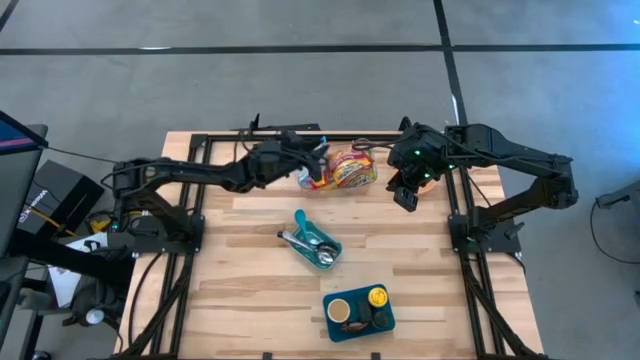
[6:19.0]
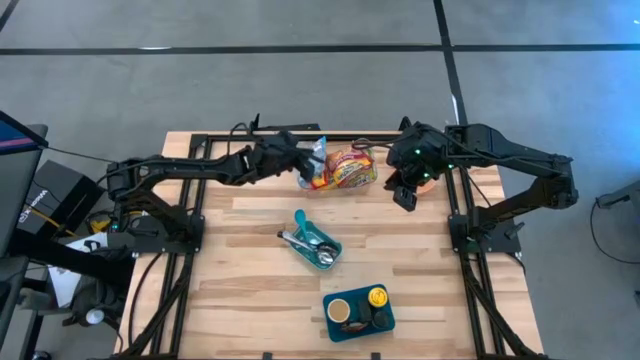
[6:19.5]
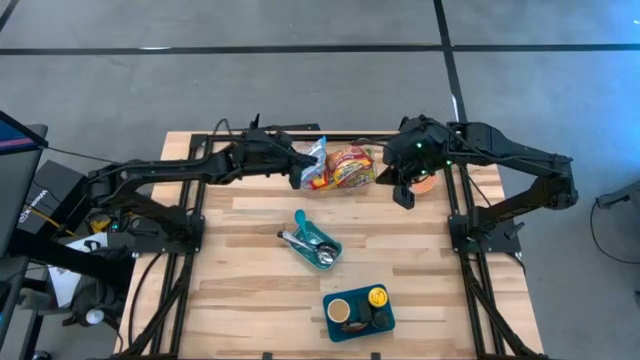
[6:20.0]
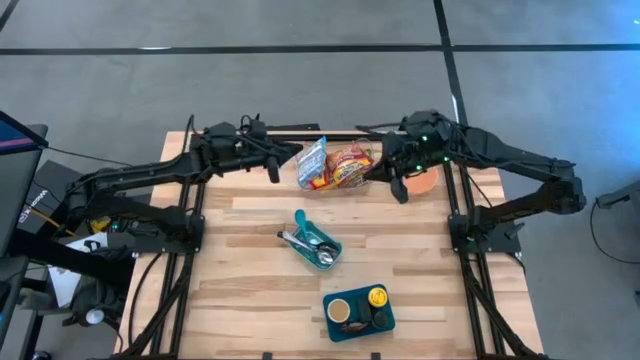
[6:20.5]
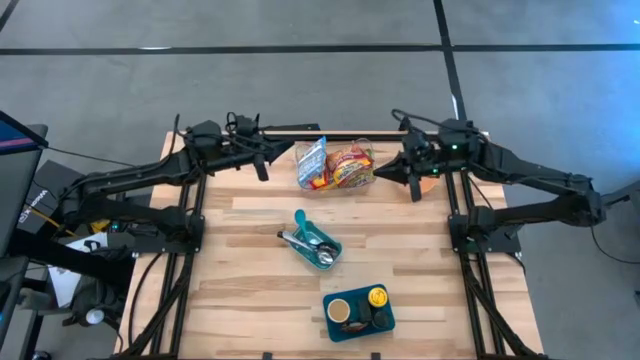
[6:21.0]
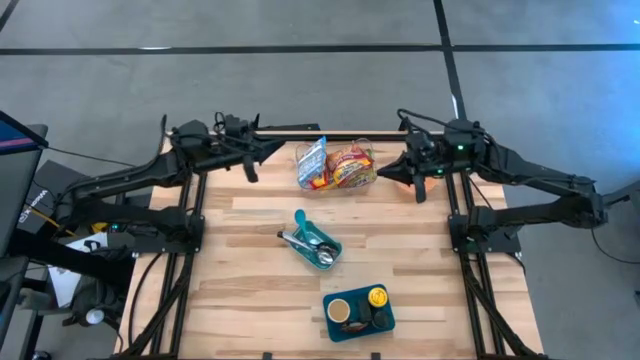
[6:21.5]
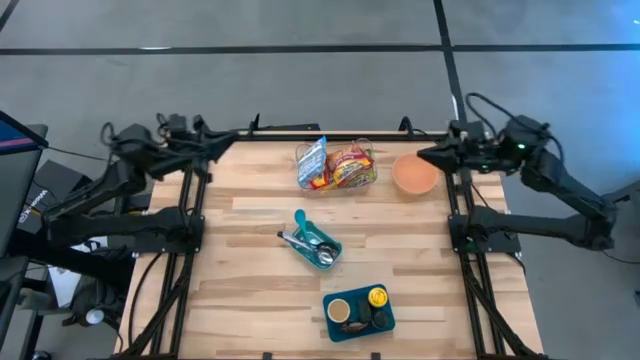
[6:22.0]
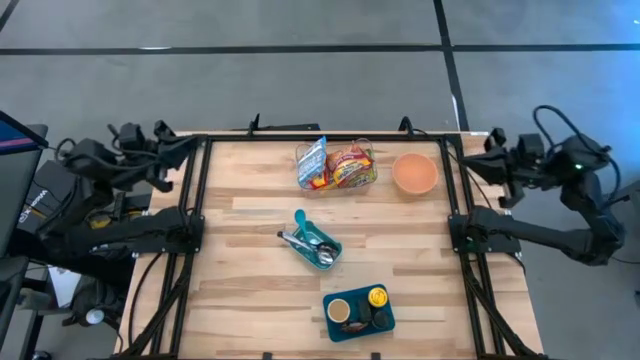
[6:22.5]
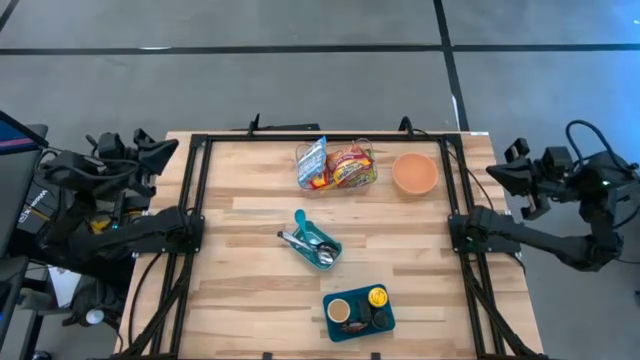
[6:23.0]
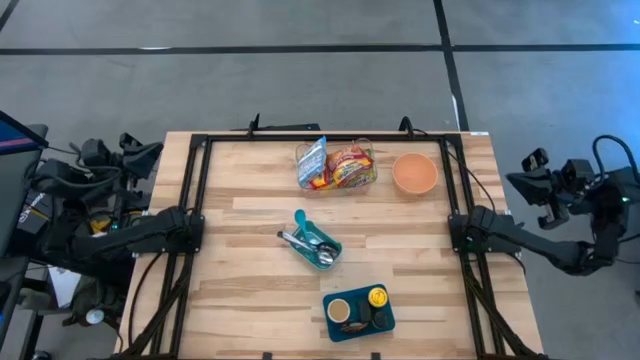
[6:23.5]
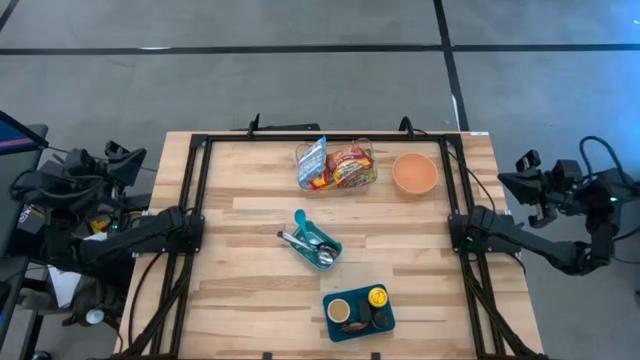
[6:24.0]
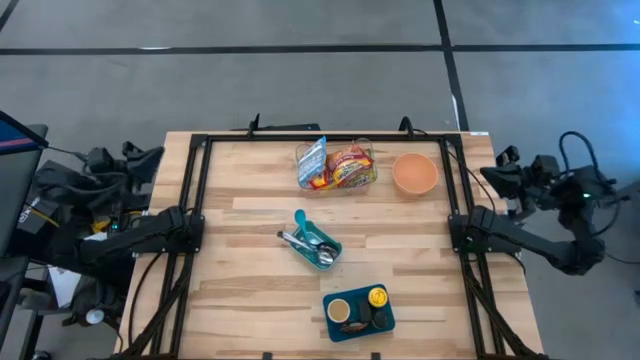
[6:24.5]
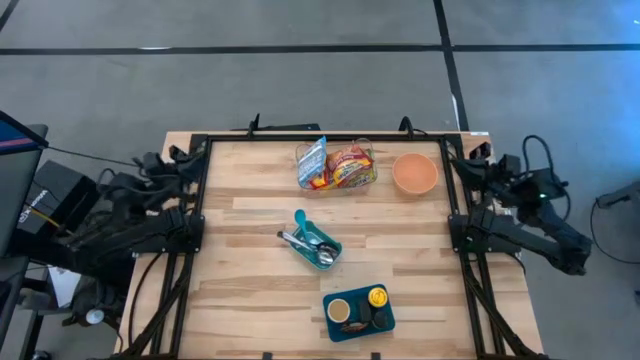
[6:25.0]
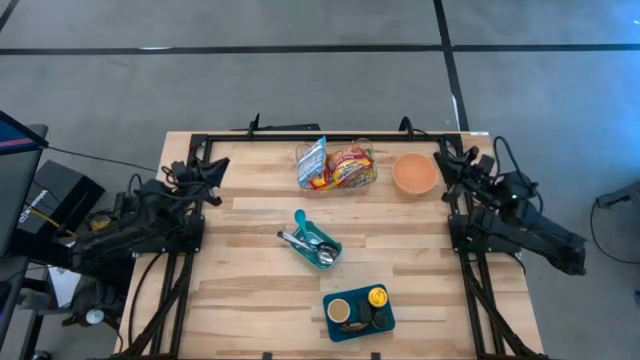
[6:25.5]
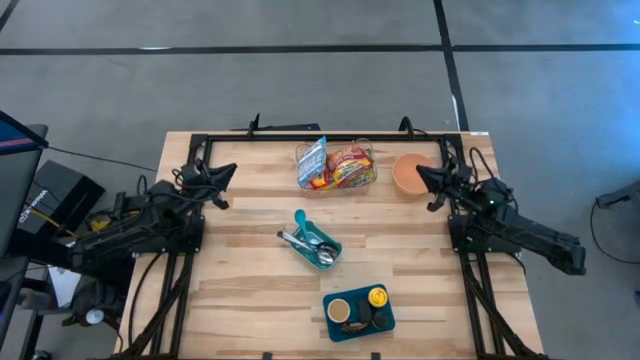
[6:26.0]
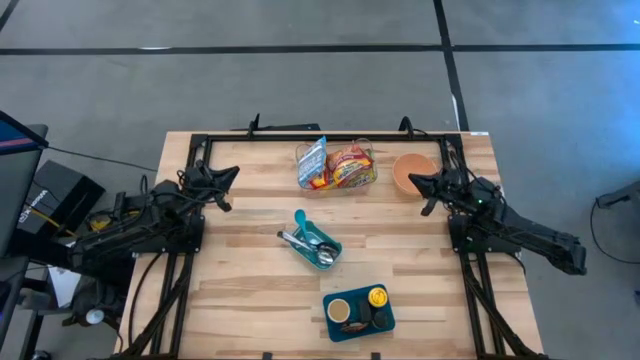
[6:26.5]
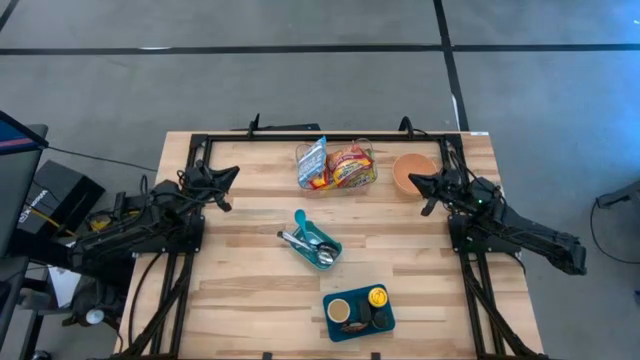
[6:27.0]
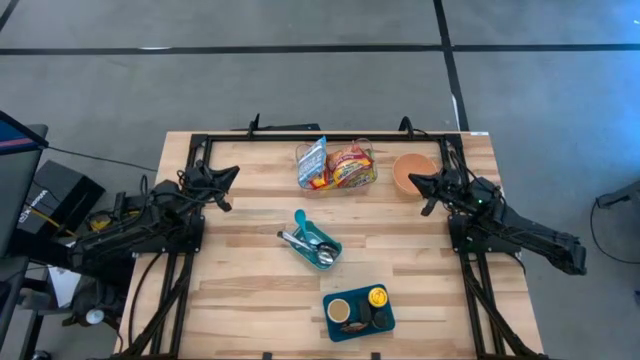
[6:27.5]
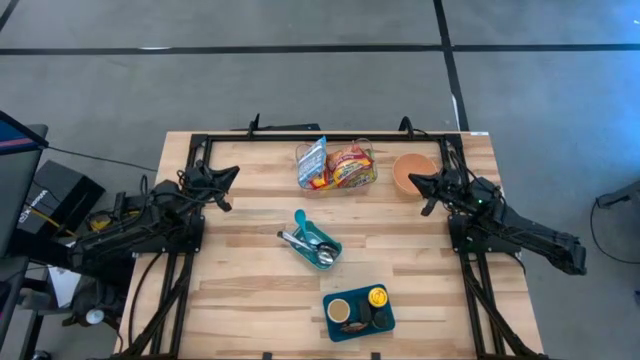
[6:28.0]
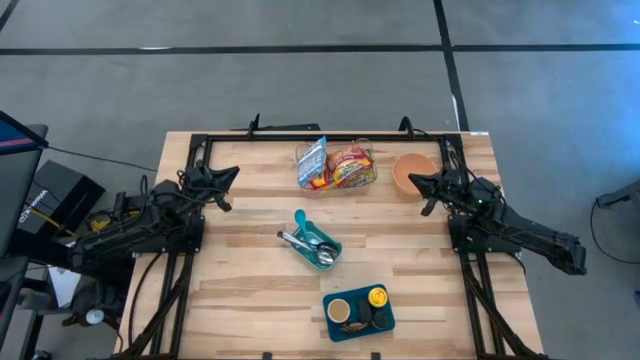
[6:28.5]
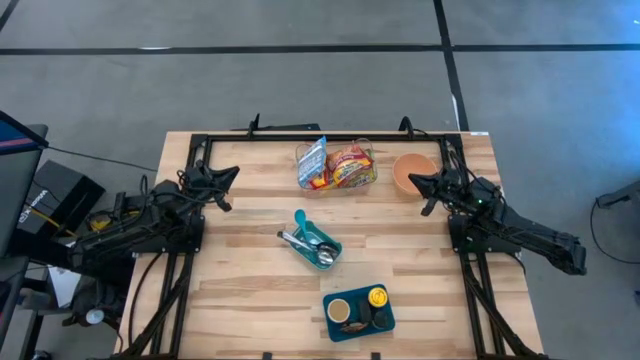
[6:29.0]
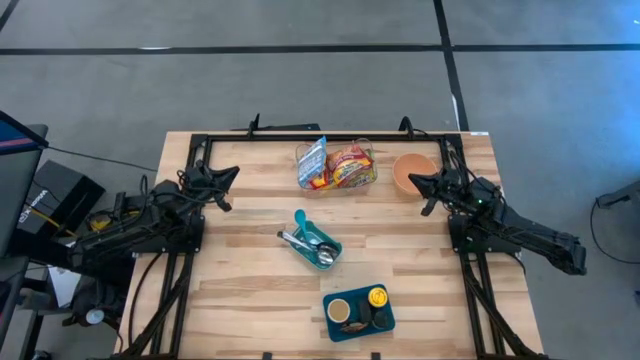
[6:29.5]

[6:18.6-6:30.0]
Task: Pick & Place Food Item
Return to Home Position

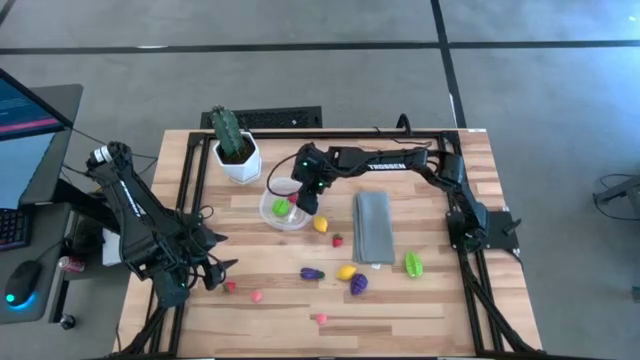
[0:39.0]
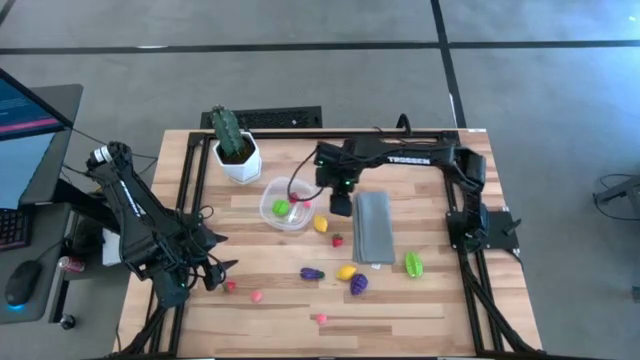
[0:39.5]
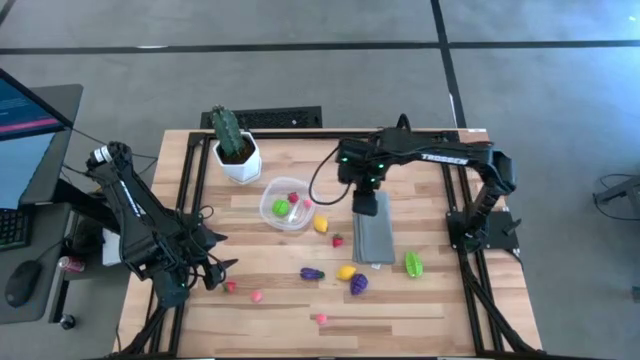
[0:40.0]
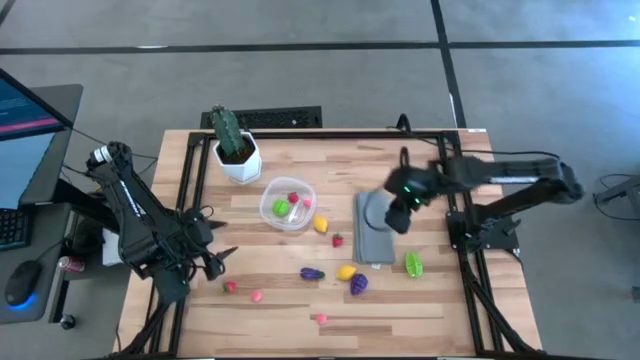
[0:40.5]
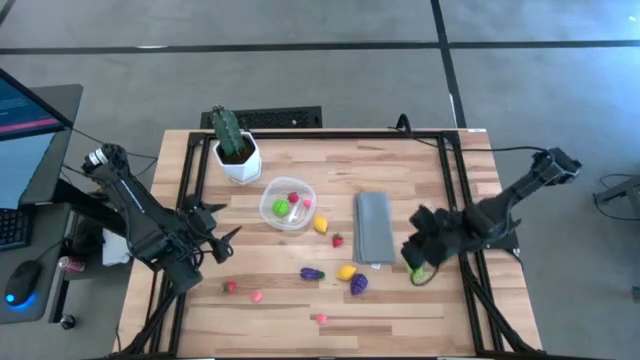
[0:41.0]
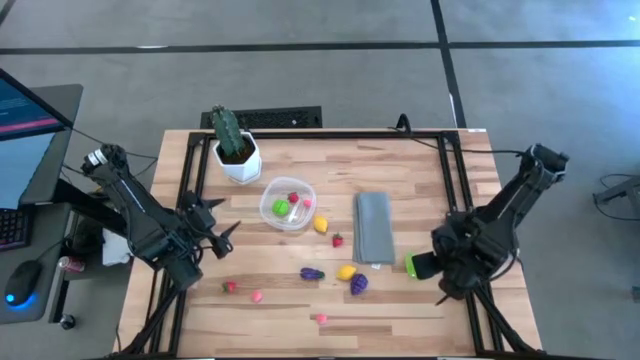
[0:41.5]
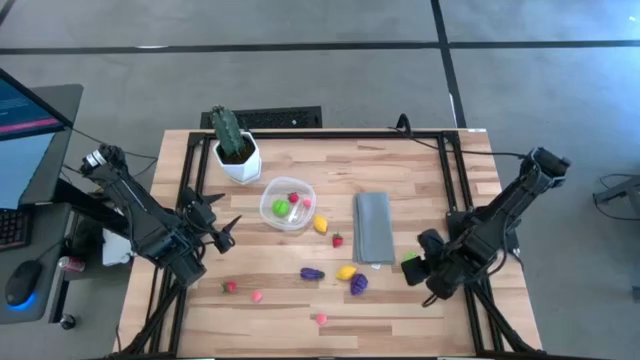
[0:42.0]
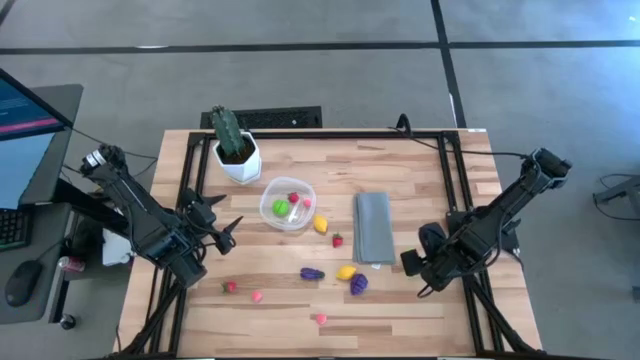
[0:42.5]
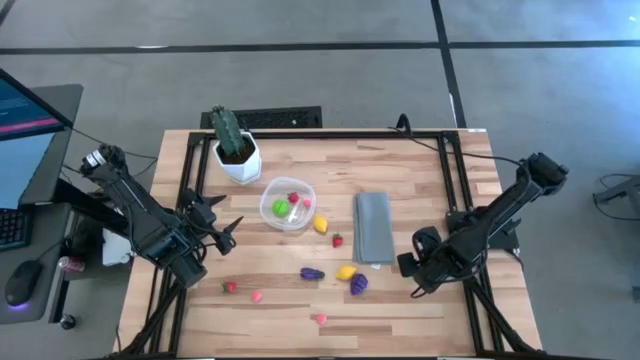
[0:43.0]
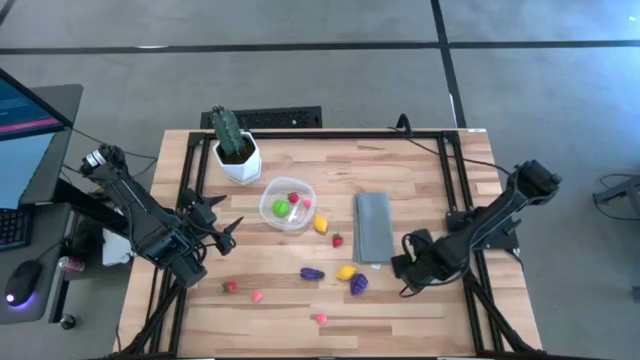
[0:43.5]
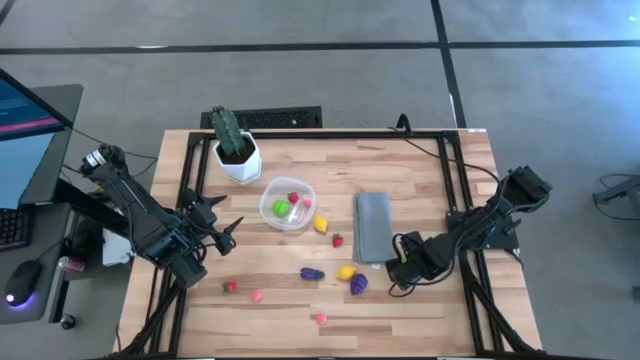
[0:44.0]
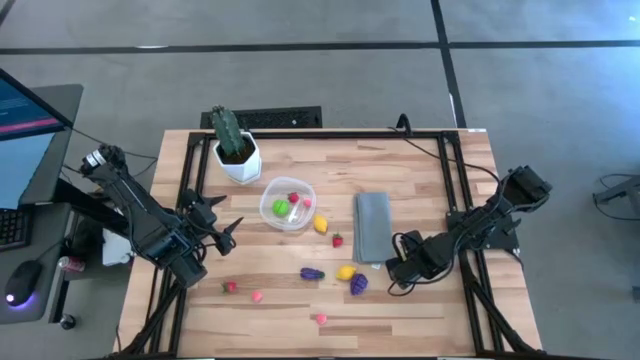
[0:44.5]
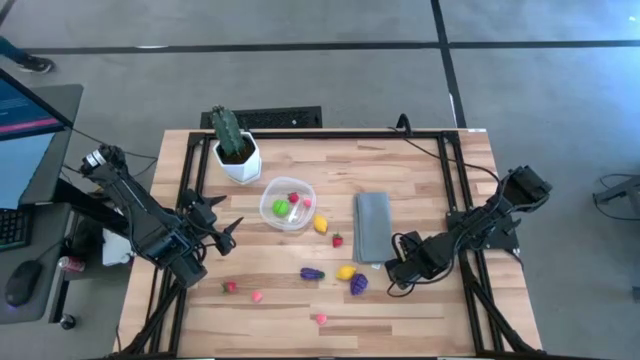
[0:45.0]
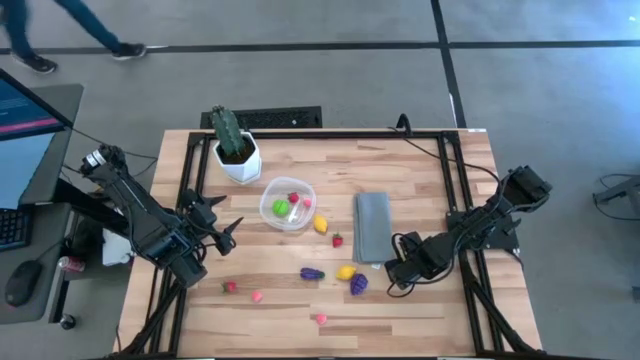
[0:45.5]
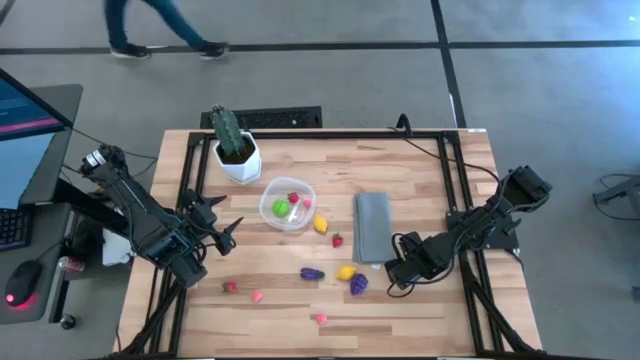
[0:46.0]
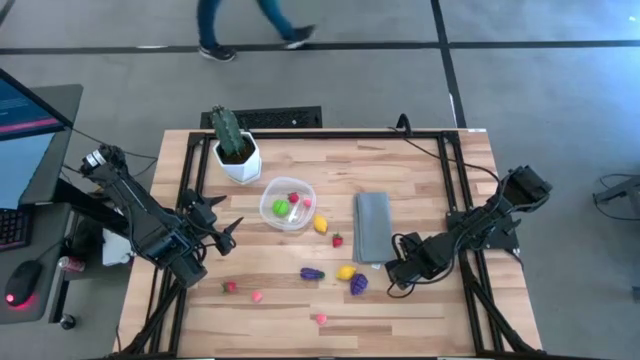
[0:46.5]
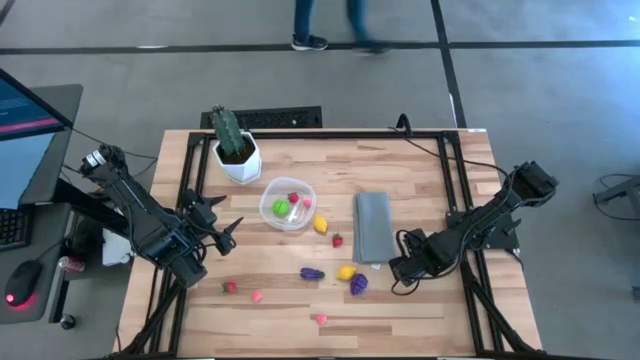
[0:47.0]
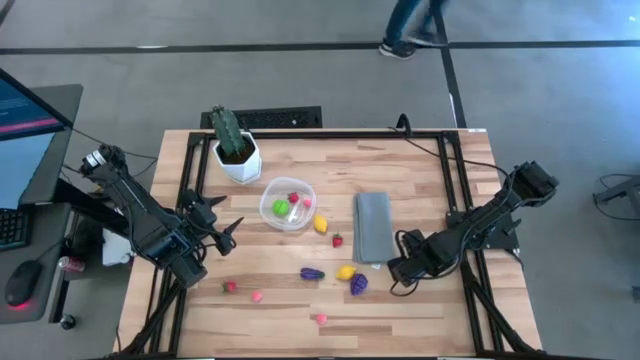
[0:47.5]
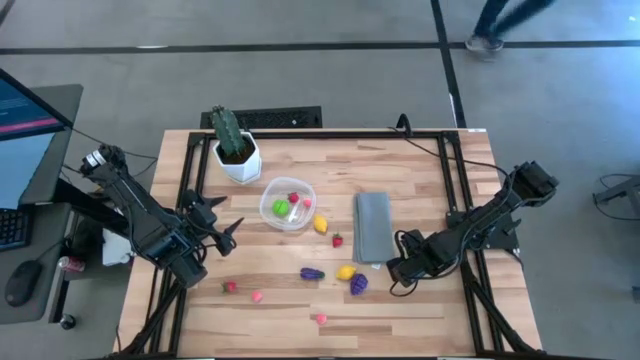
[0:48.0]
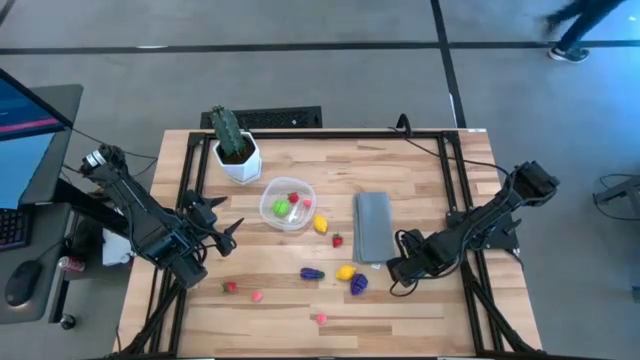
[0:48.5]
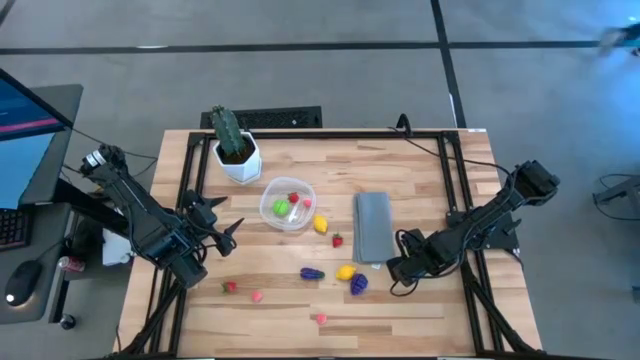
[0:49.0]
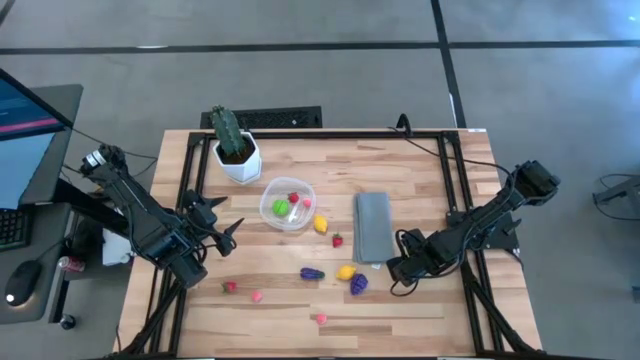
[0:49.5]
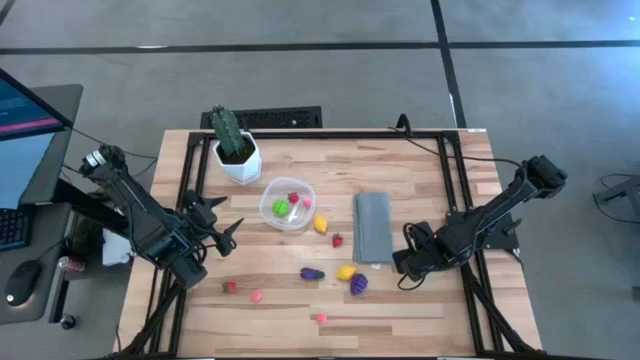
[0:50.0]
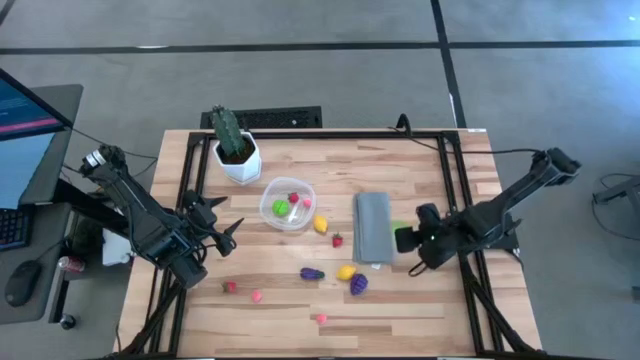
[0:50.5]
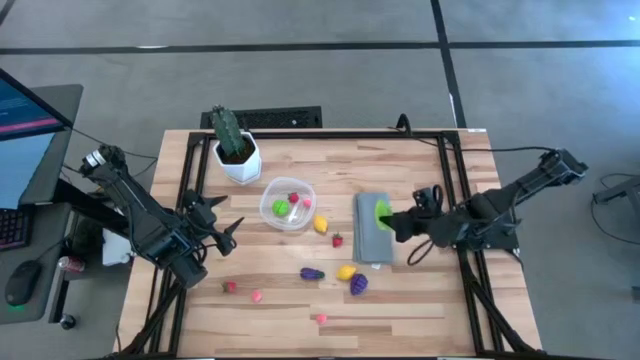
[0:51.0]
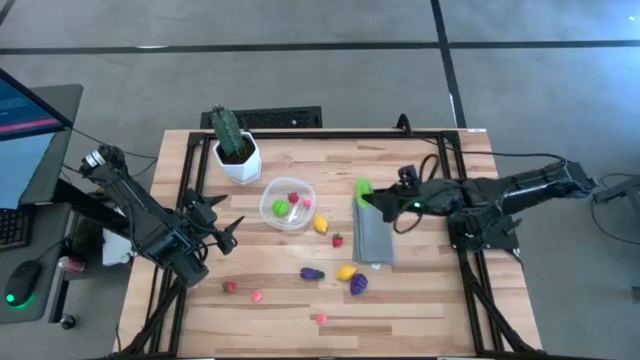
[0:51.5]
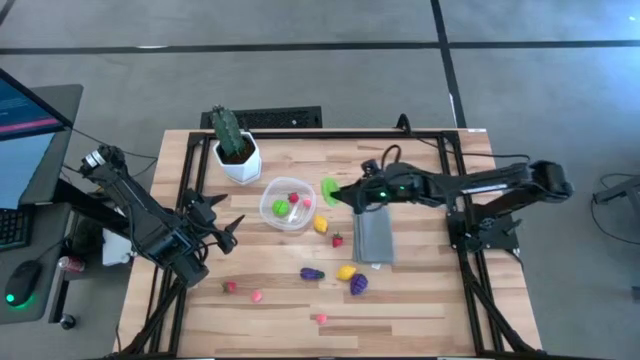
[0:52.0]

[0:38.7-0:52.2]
Task: Pick and placing Produce into tupperware
Put the green starfruit into the transparent container
